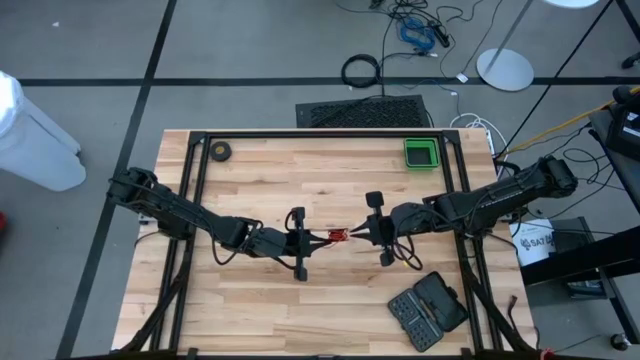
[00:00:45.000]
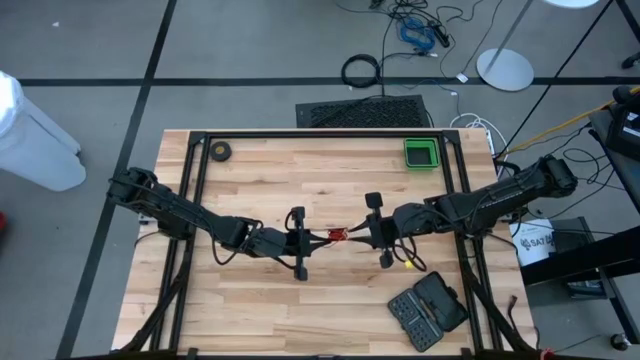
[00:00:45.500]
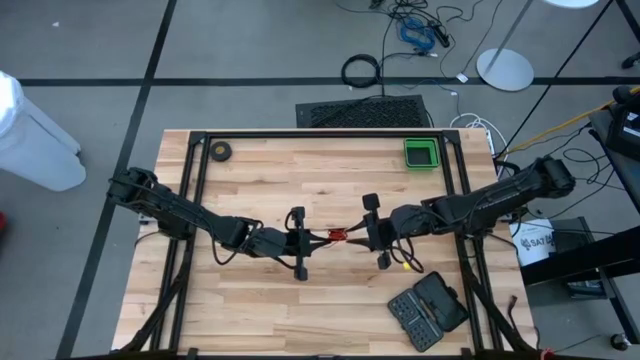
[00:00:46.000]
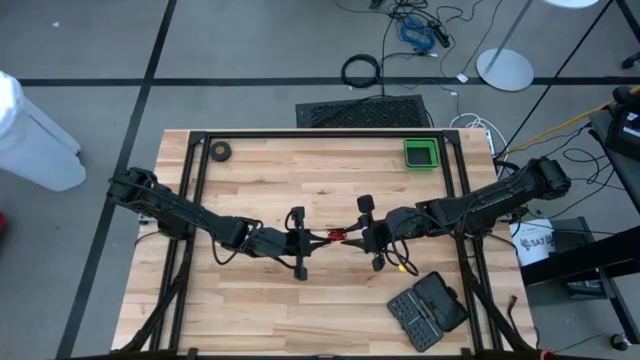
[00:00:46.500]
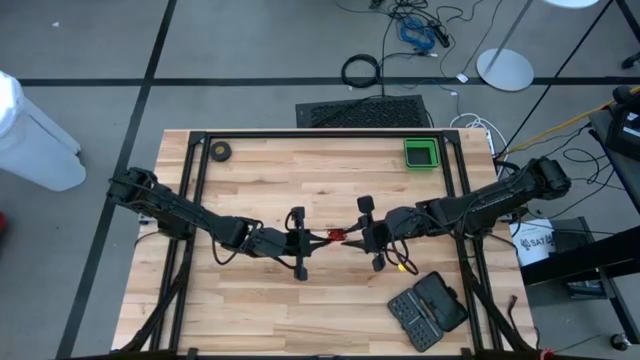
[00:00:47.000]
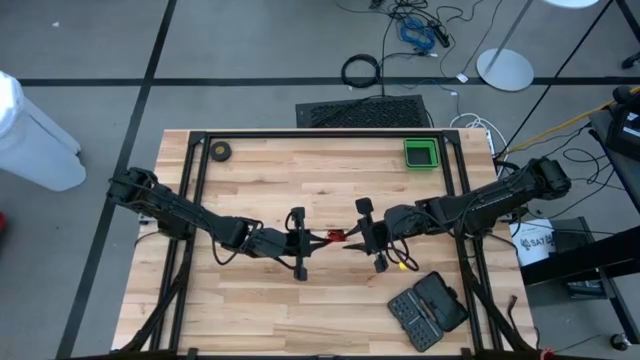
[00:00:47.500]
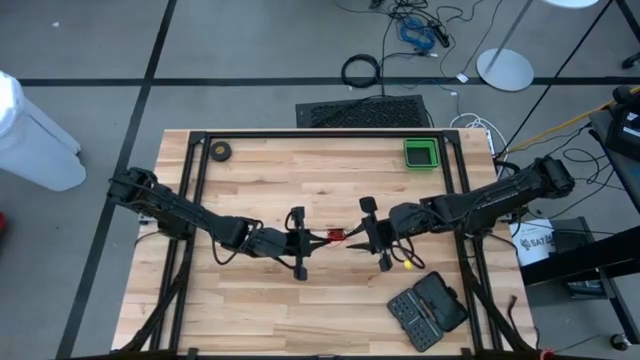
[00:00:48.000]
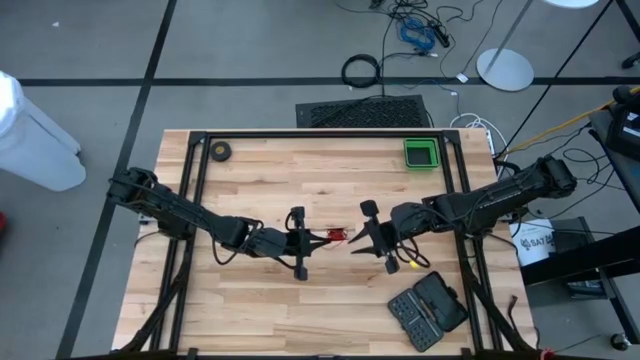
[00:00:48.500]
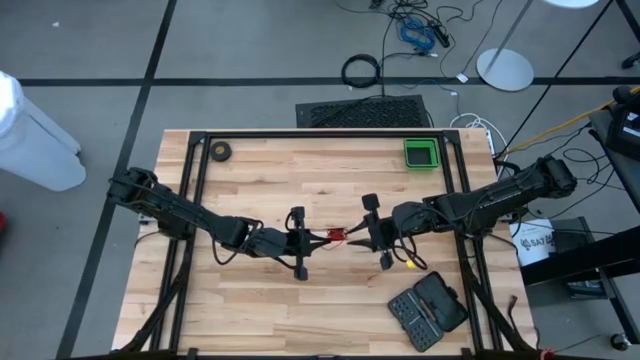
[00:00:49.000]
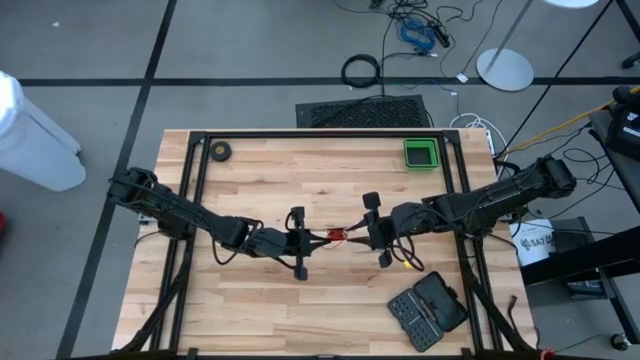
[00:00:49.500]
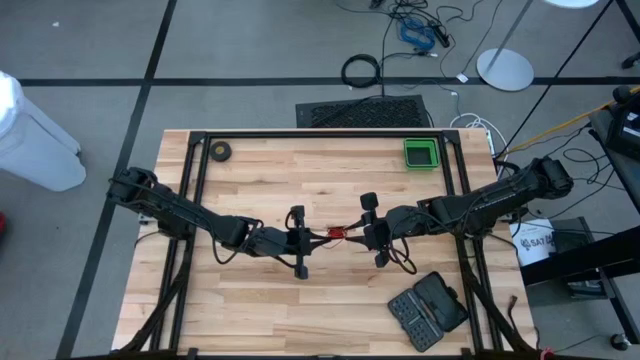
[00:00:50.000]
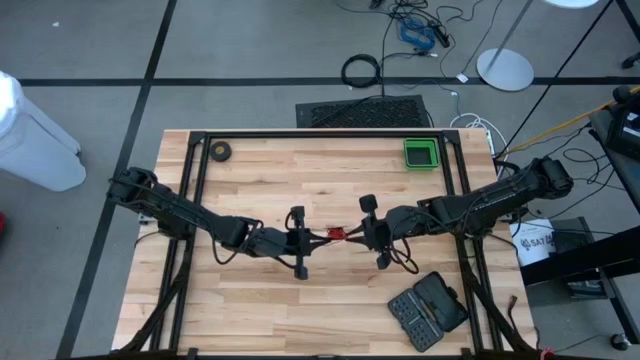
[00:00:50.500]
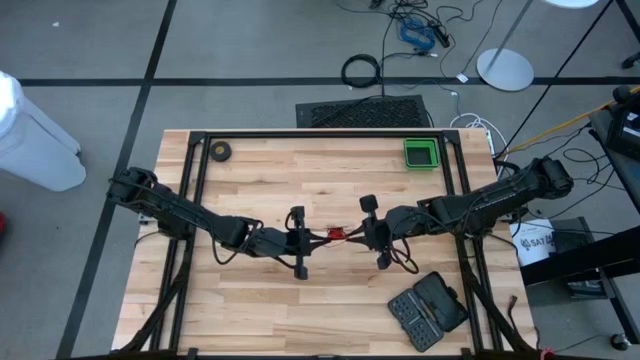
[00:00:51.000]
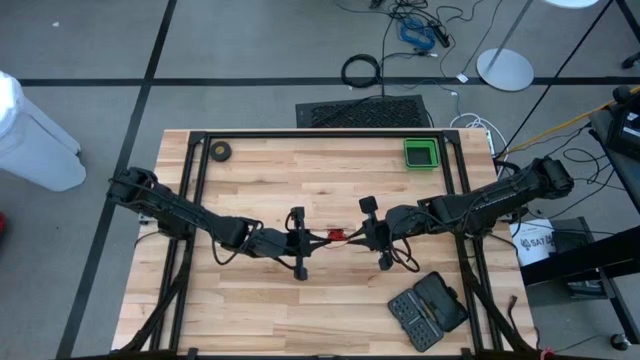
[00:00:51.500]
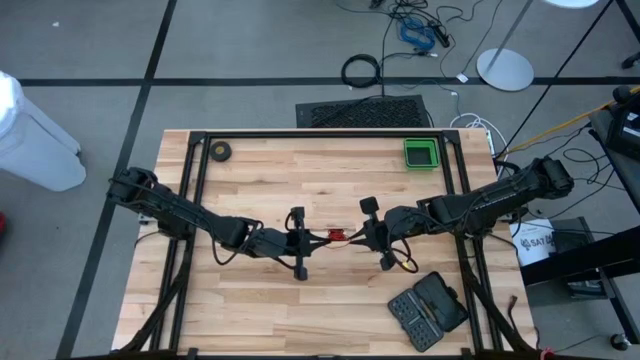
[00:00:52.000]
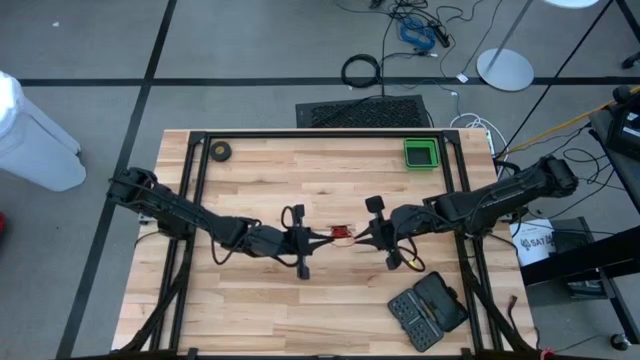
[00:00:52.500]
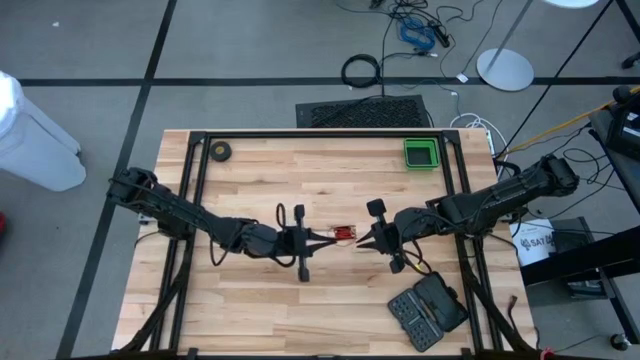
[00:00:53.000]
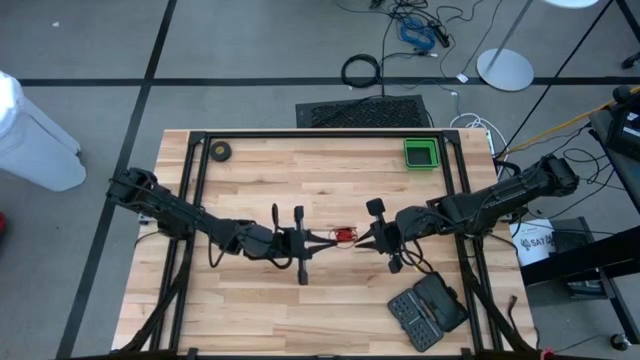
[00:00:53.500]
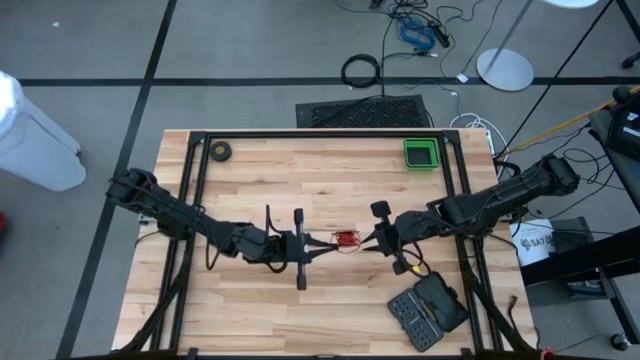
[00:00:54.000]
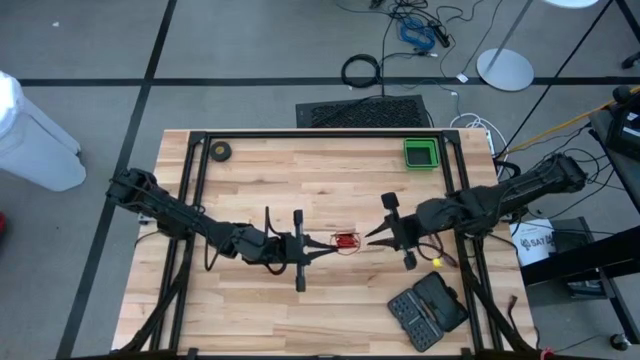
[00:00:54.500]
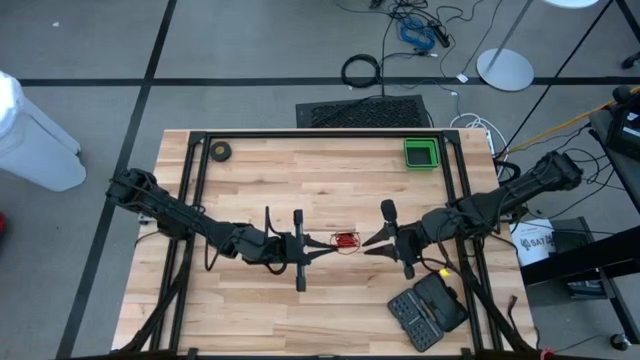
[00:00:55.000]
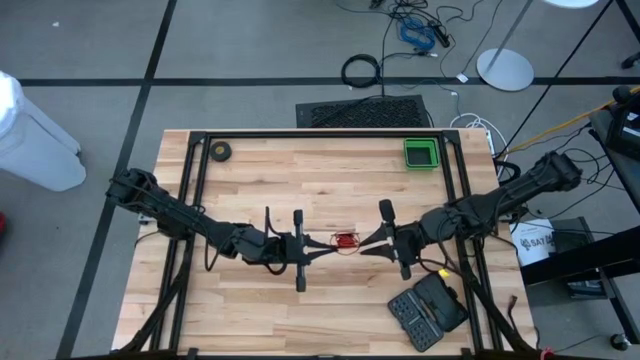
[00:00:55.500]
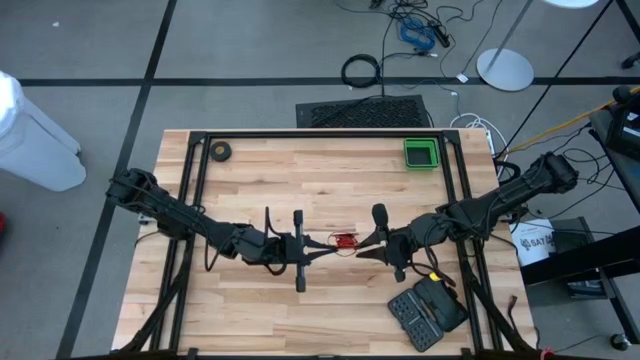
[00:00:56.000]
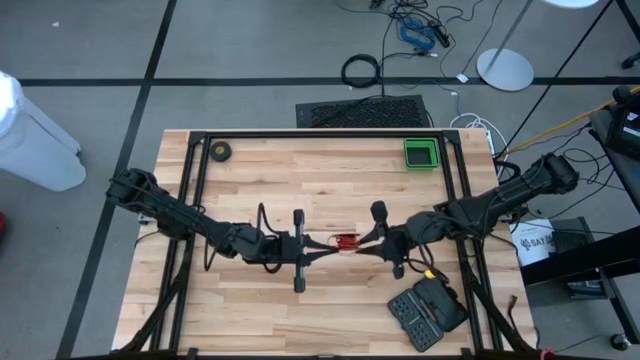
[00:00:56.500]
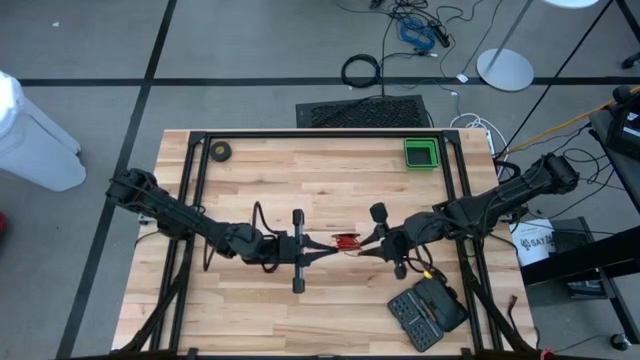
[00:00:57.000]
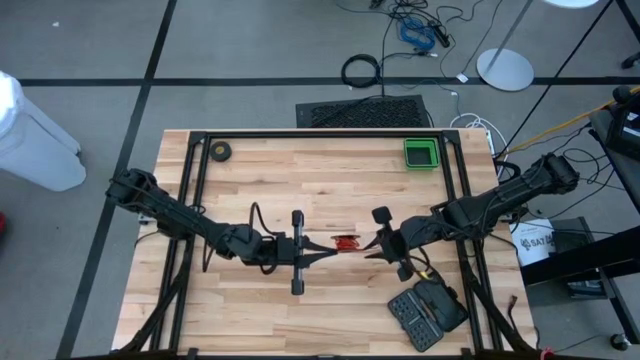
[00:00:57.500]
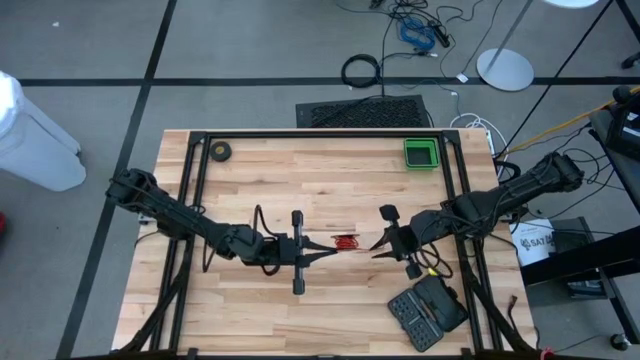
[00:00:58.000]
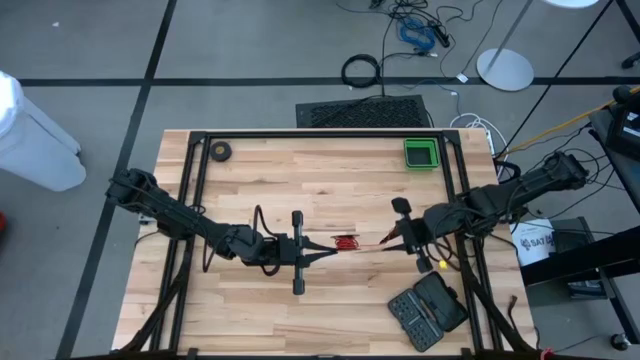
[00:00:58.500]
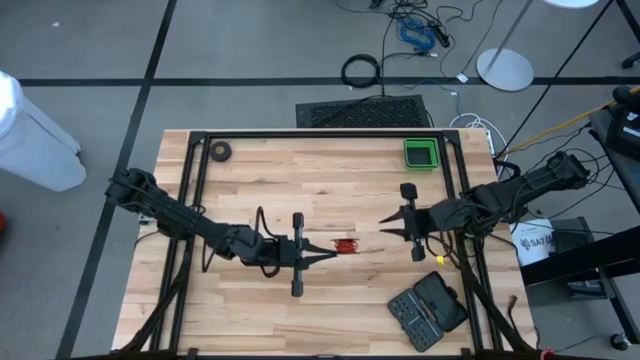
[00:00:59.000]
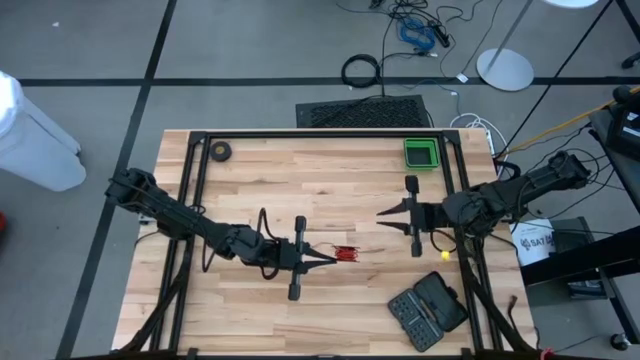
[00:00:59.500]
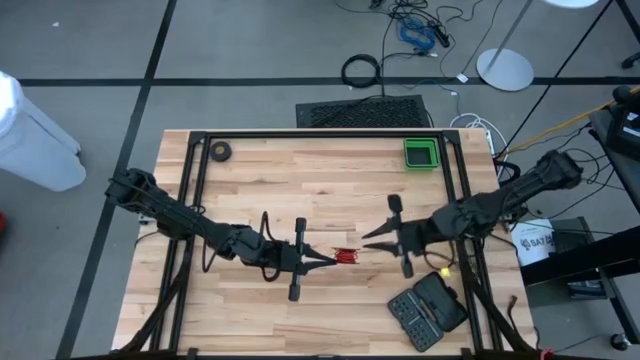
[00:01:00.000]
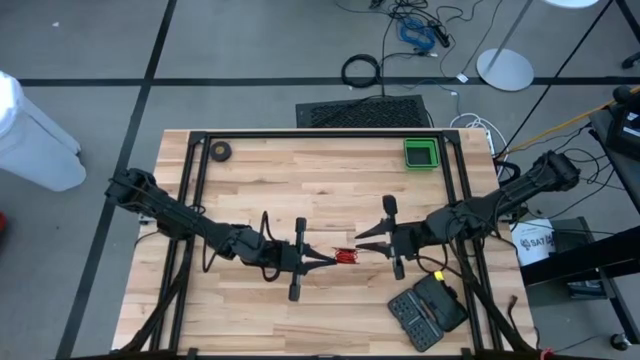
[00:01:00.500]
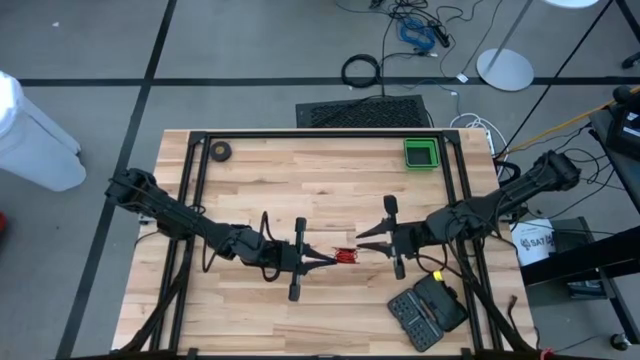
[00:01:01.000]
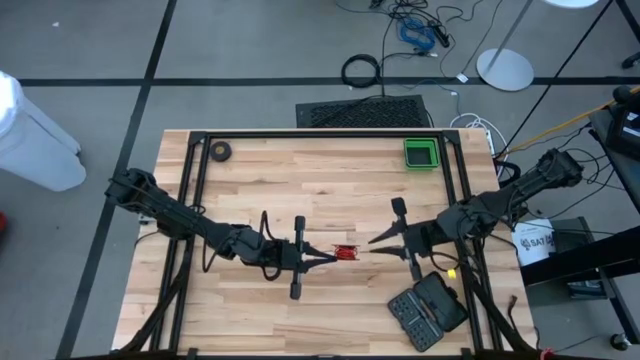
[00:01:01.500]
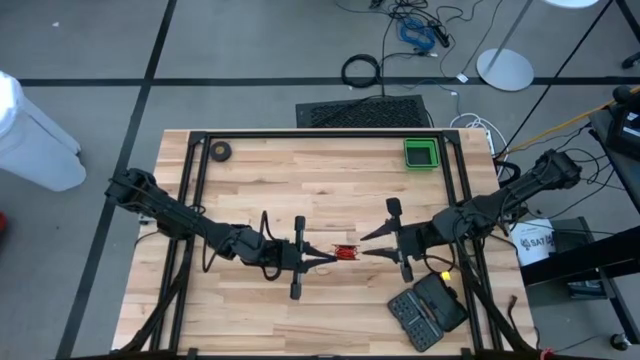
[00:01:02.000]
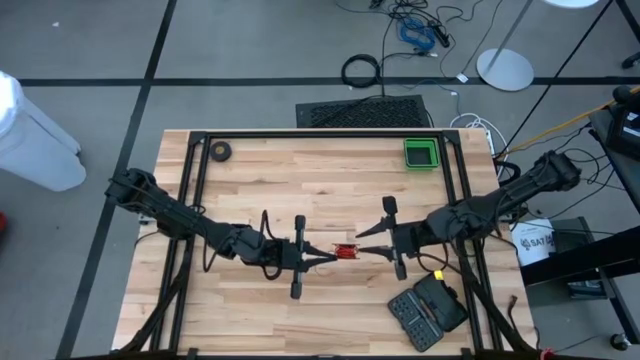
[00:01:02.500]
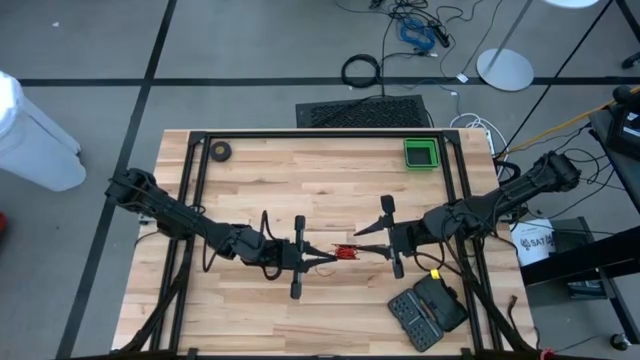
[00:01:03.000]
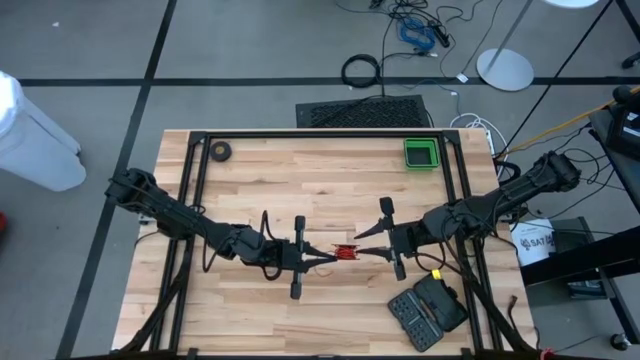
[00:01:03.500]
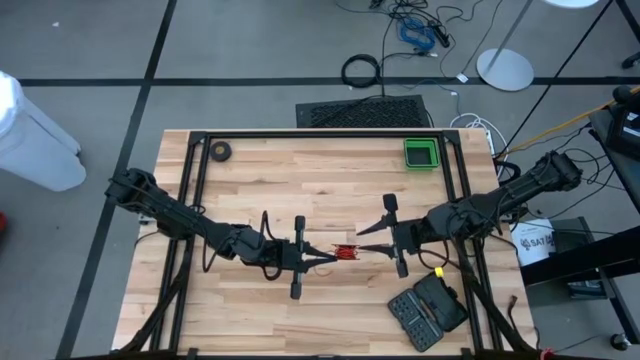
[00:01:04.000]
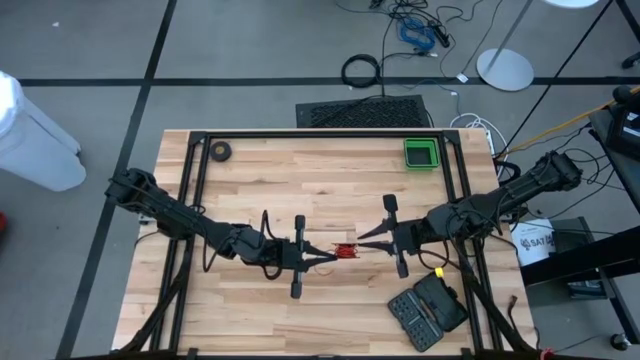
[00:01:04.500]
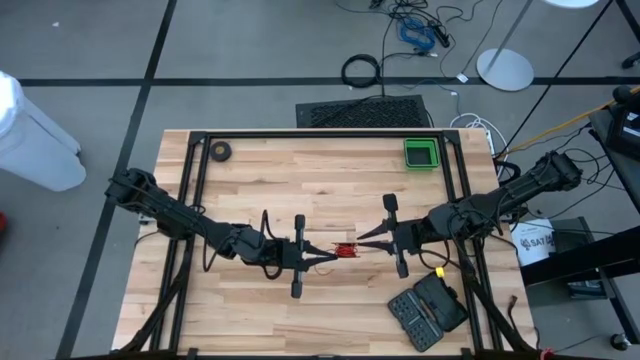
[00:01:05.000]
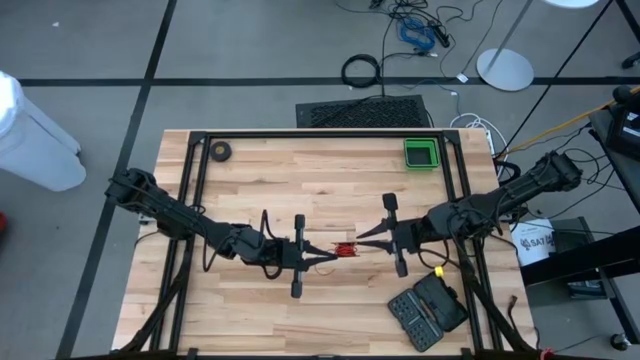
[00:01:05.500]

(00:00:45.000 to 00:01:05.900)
Task: Coil cords
Uncoil the red wire from the spool
